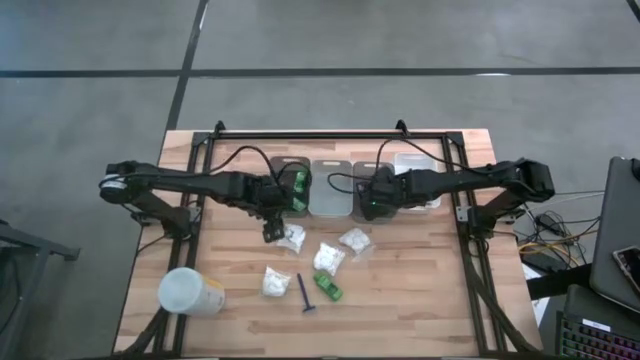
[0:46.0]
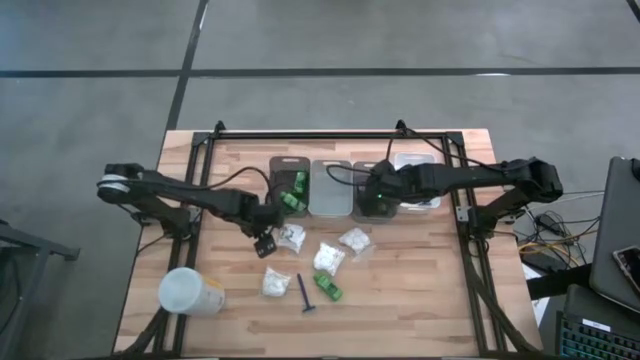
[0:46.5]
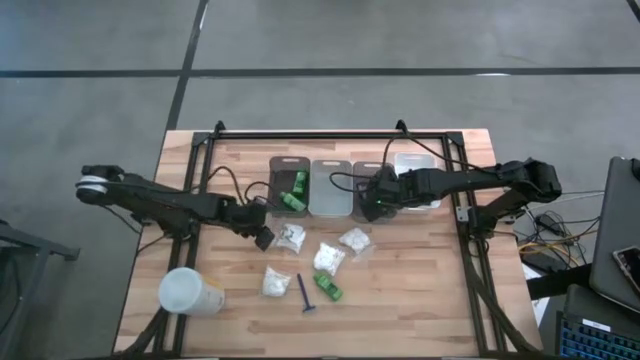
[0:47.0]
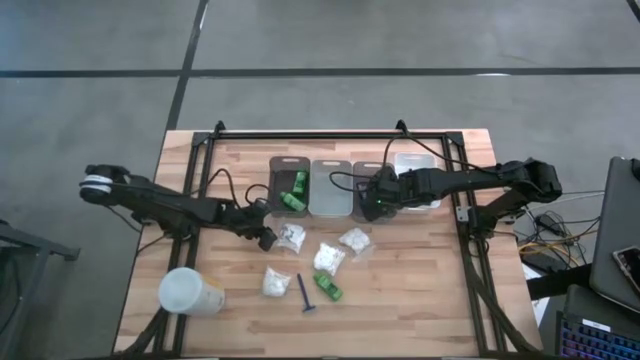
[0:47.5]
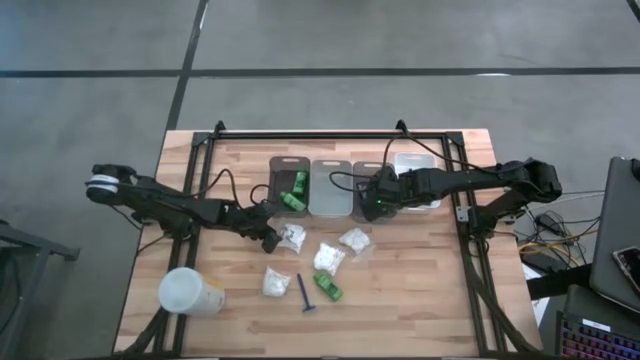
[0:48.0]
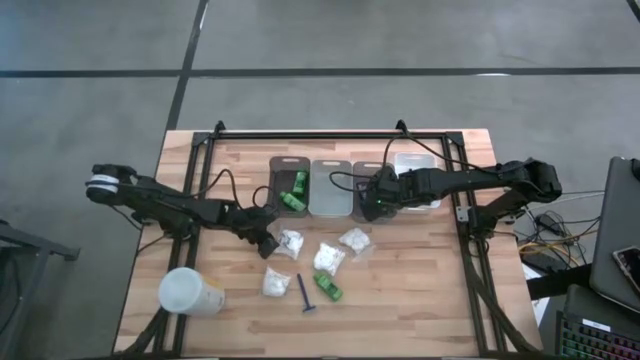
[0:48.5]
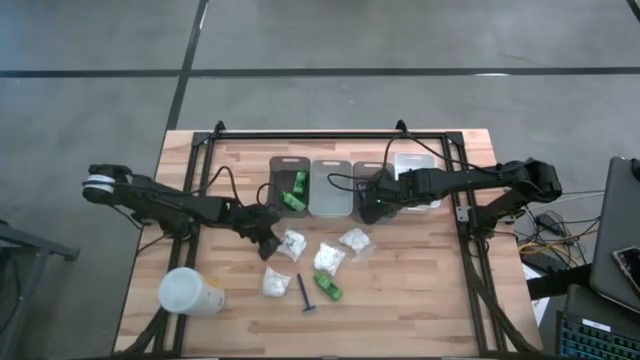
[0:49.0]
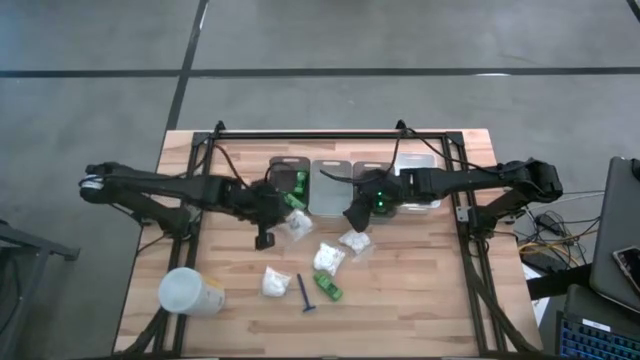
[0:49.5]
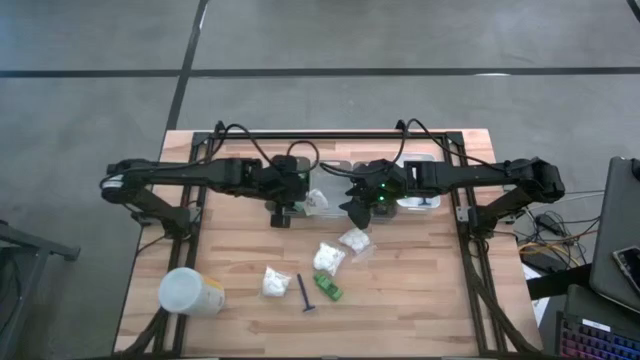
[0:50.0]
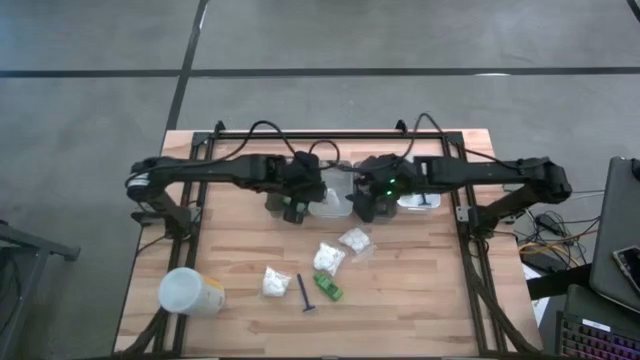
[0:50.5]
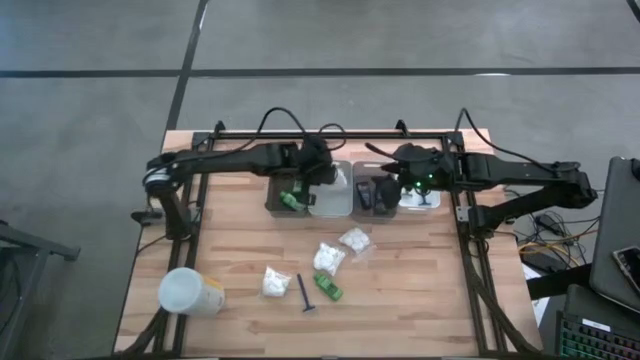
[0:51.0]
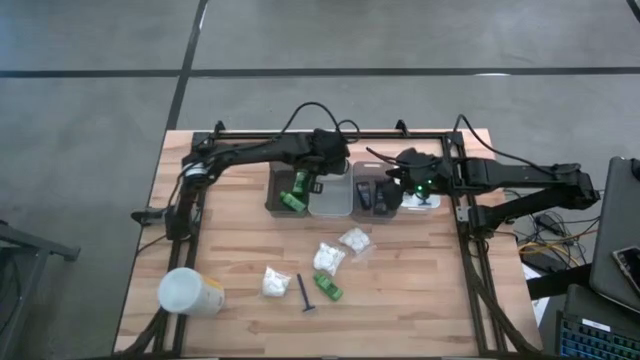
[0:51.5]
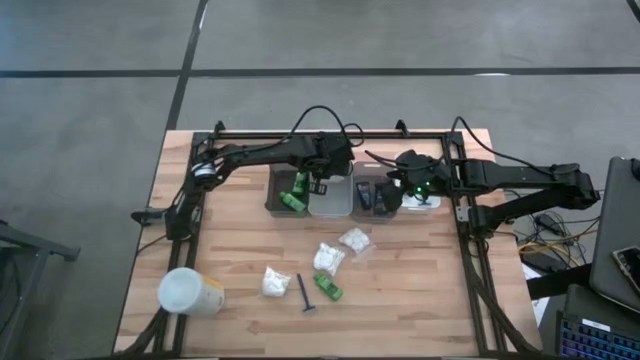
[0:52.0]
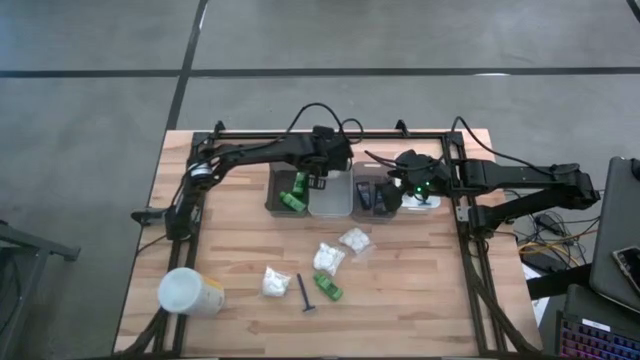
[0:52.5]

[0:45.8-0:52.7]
Task: Pick & Place Travel size toiletries
Put the white cotton pack into the gray bin

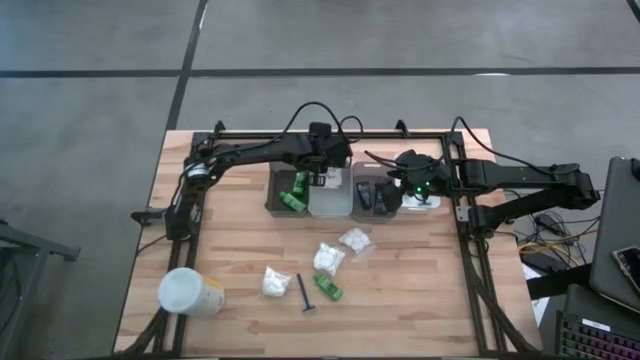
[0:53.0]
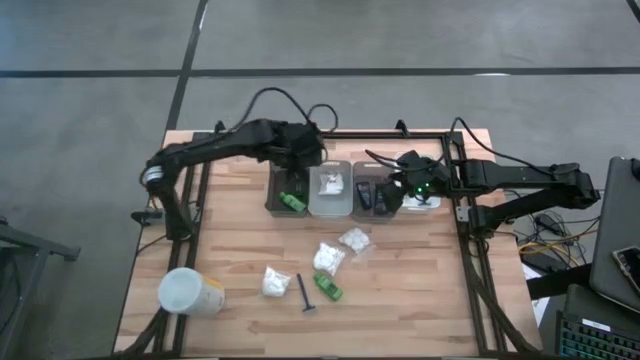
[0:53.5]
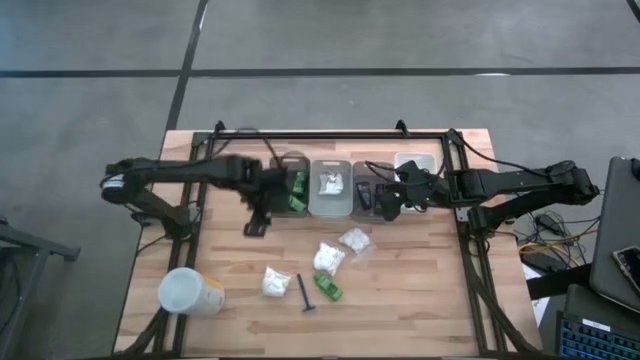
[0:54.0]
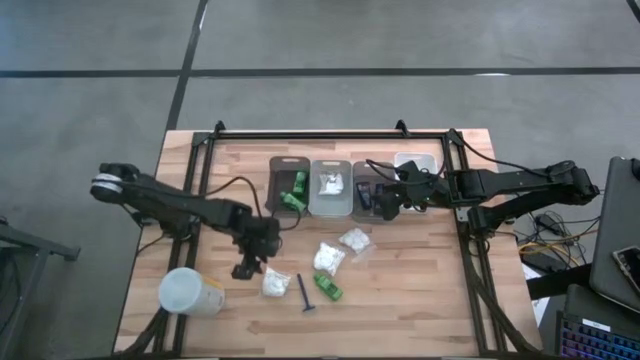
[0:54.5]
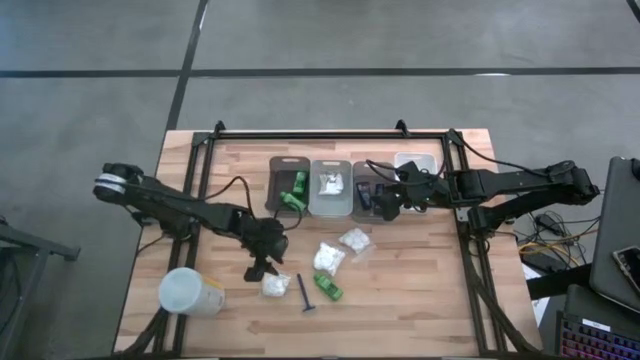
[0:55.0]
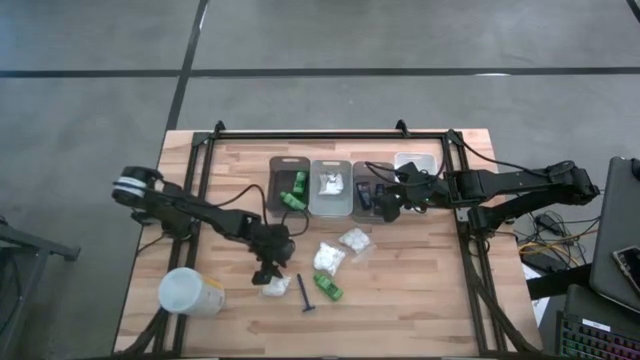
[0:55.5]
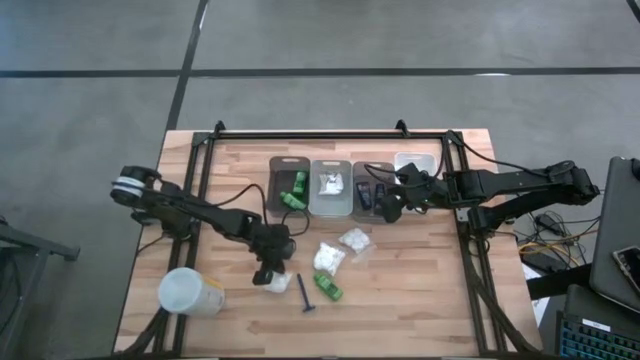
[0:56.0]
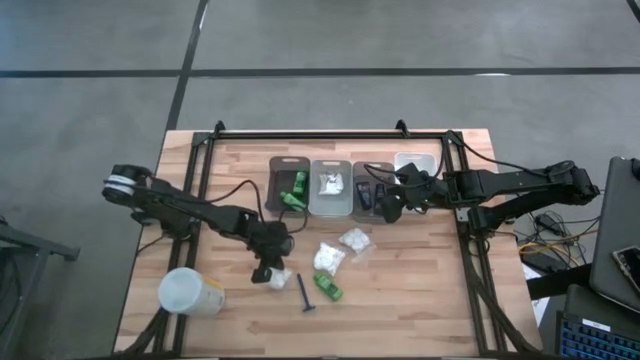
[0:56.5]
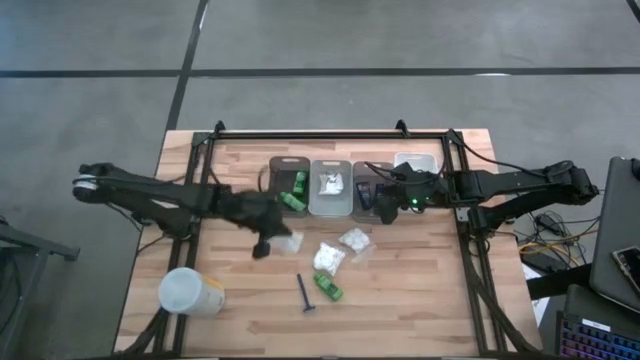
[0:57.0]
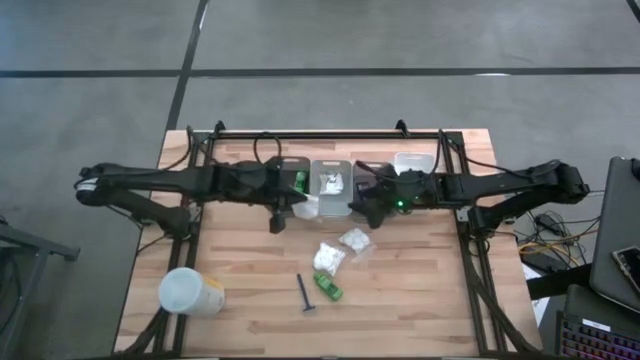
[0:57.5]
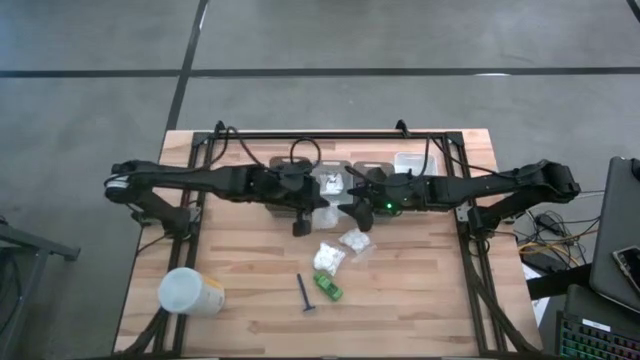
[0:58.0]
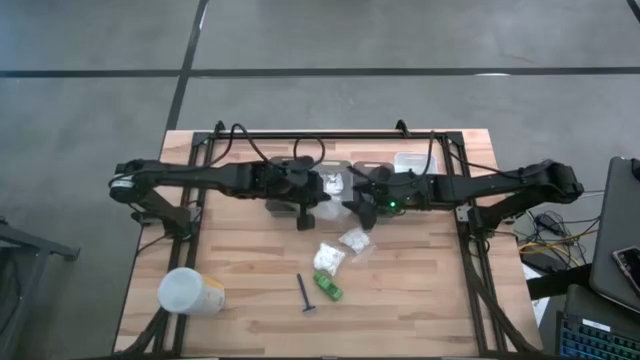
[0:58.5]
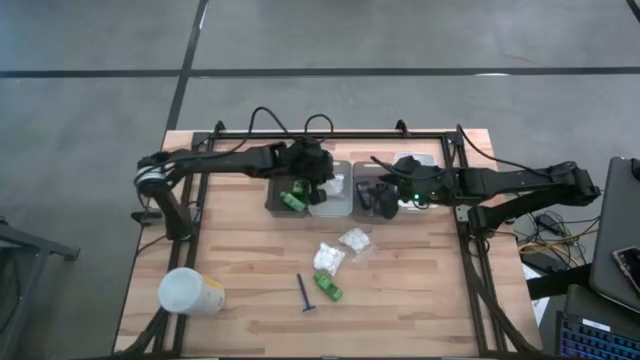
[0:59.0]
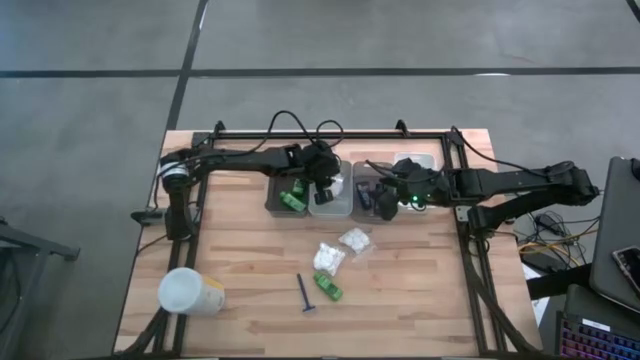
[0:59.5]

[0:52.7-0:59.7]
Put the left white cotton pack into the gray bin

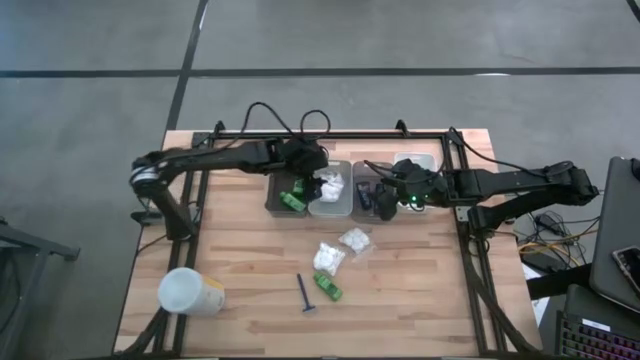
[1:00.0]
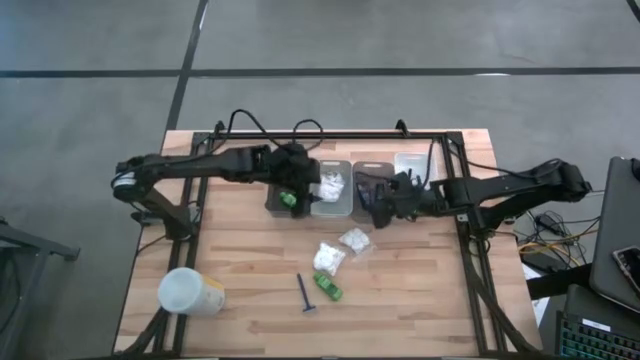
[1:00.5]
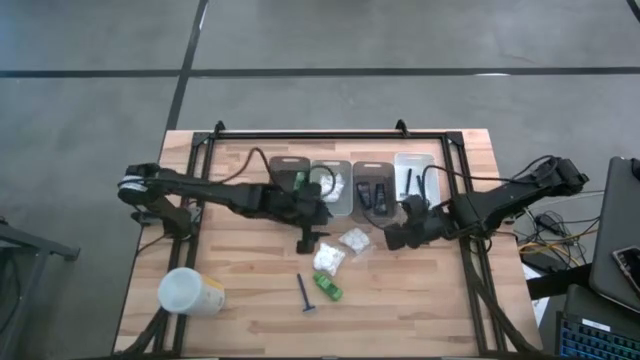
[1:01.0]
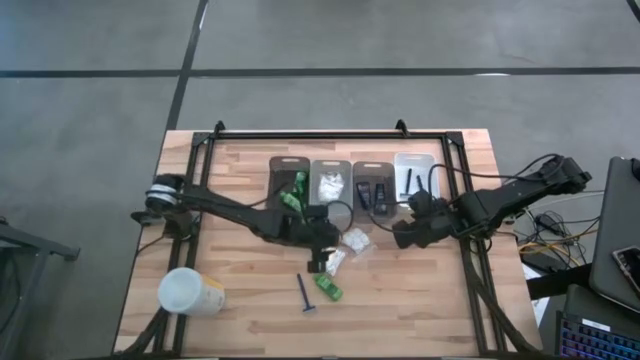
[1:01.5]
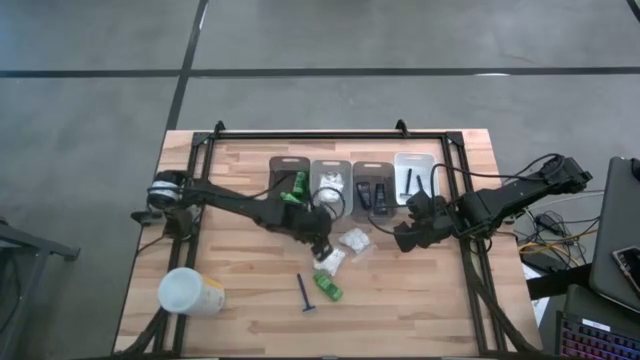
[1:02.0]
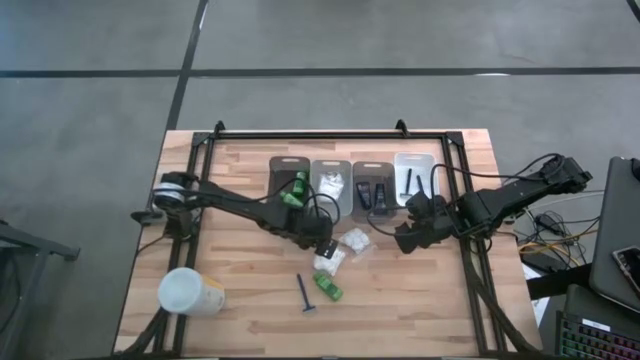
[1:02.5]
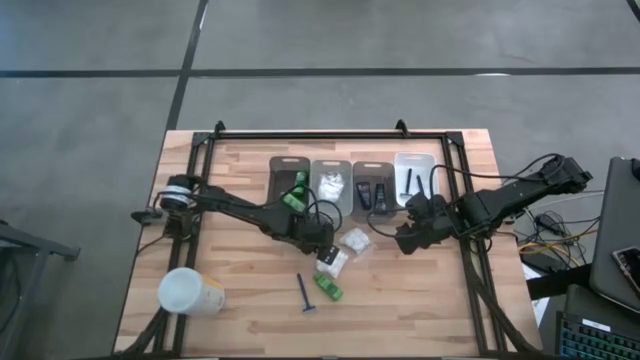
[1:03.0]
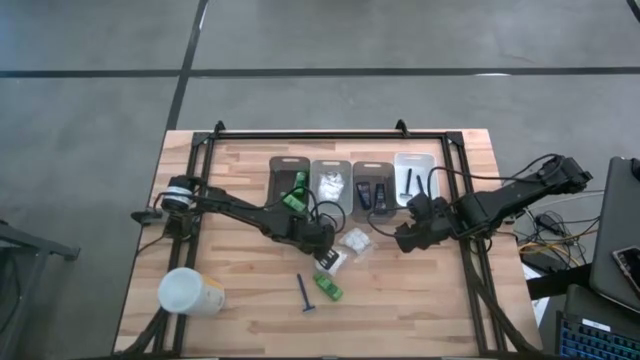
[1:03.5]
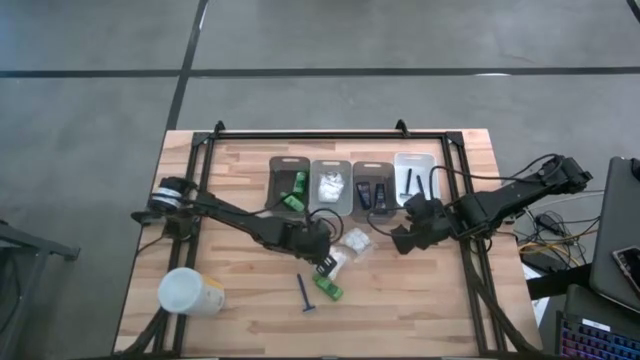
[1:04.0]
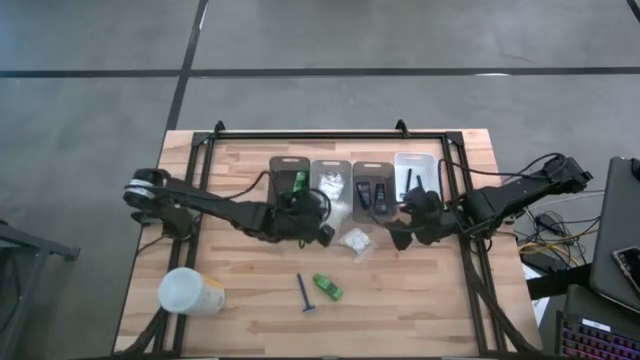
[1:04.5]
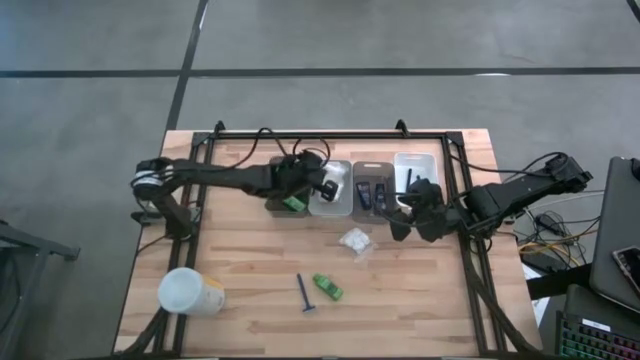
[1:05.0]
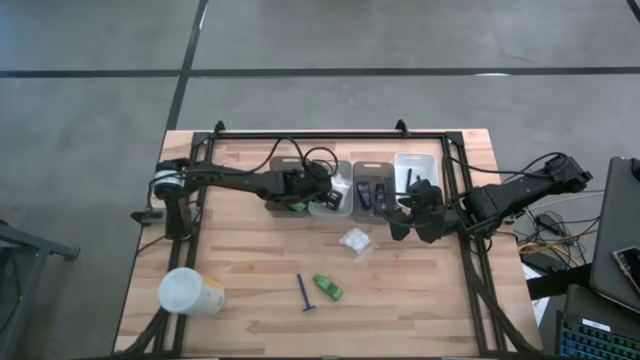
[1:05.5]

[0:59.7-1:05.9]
Put the left white cotton pack into the gray bin
